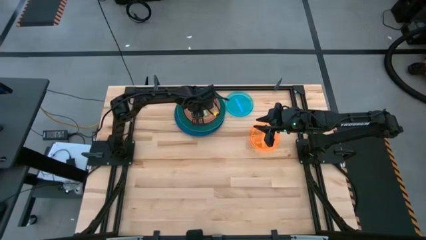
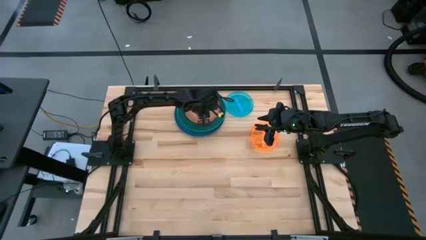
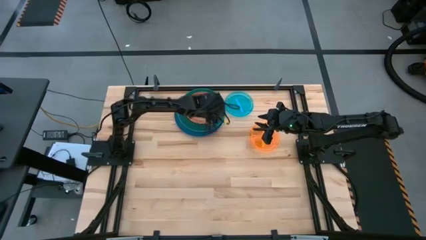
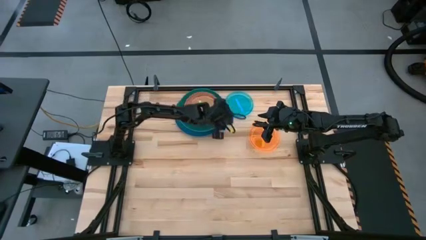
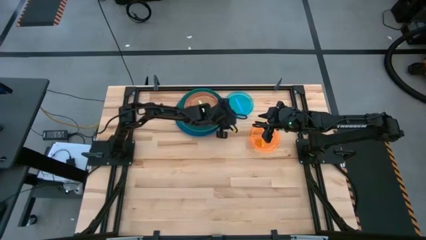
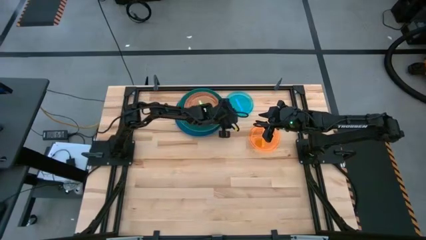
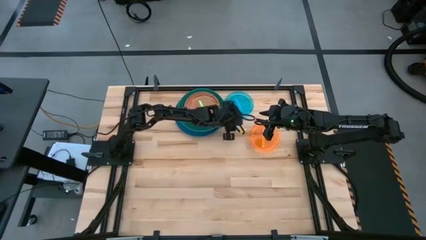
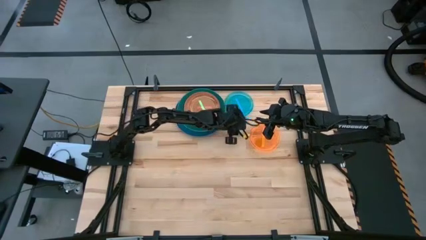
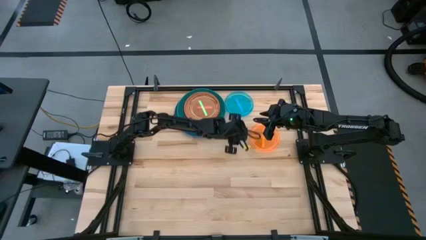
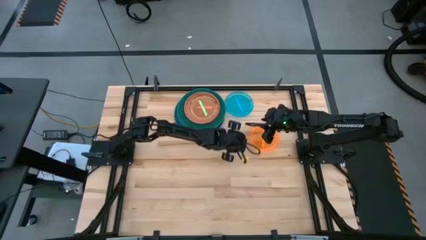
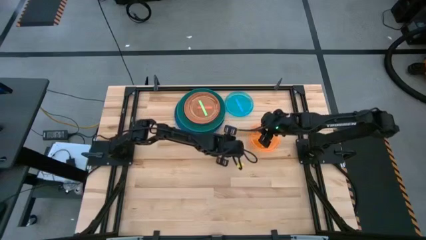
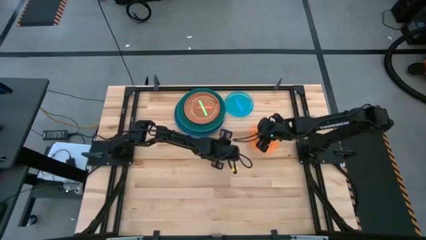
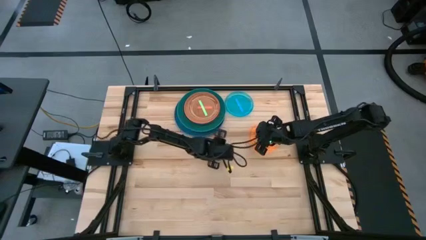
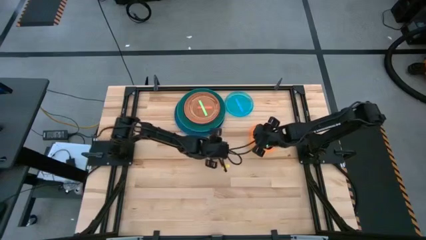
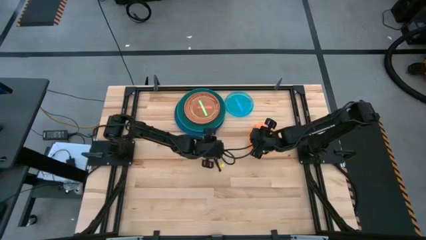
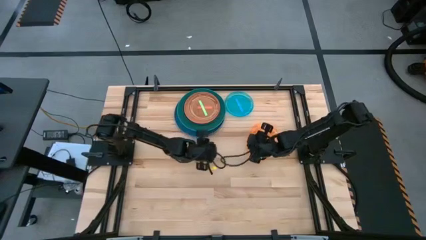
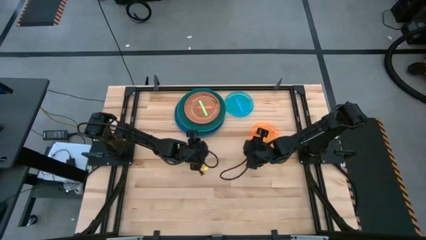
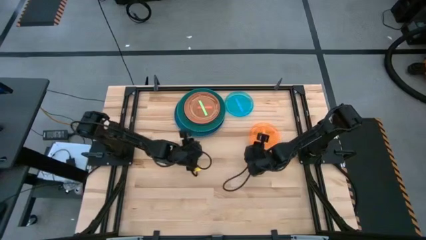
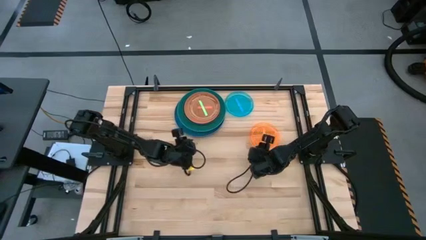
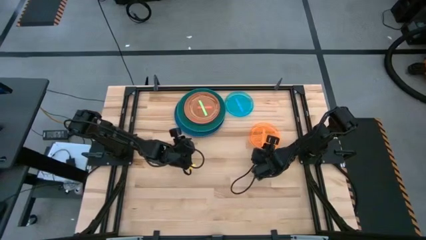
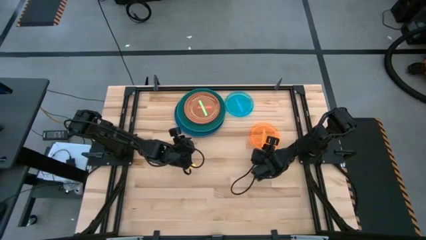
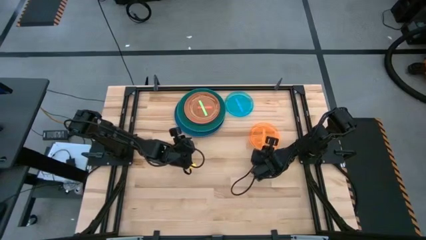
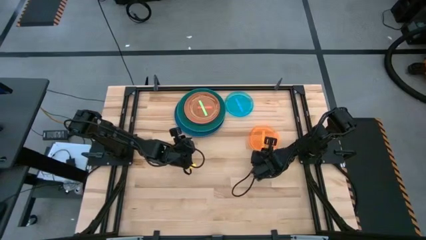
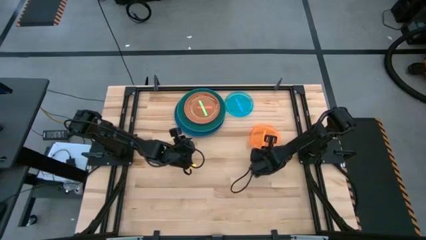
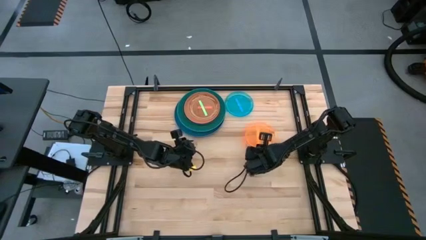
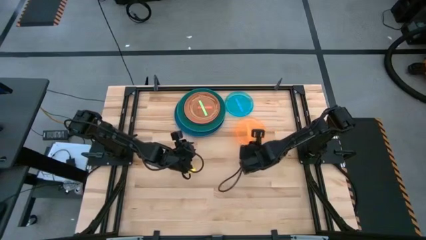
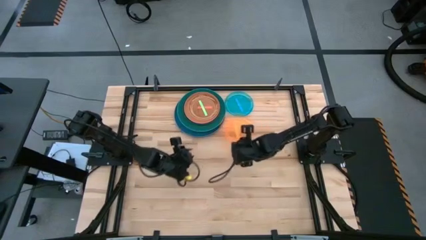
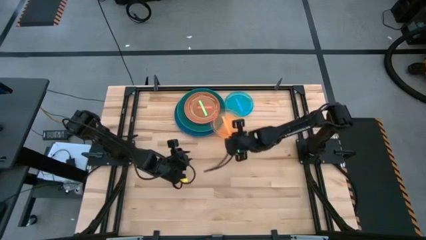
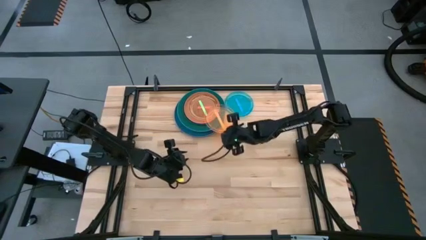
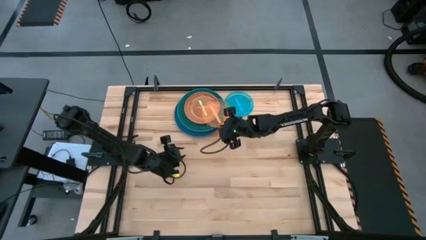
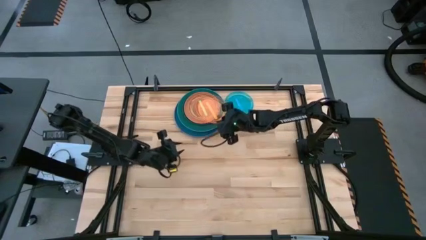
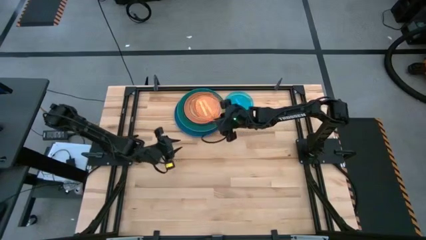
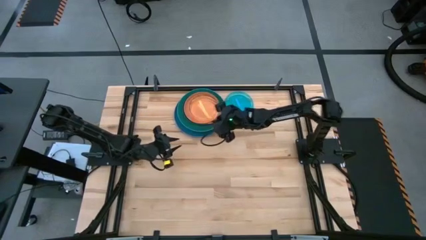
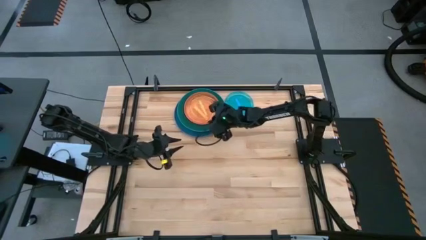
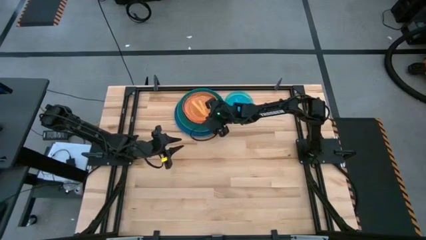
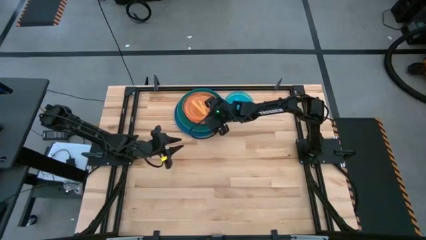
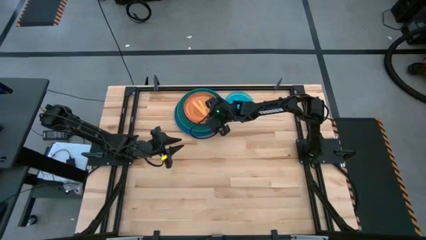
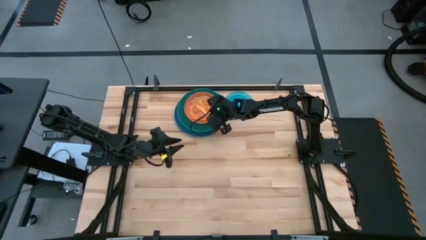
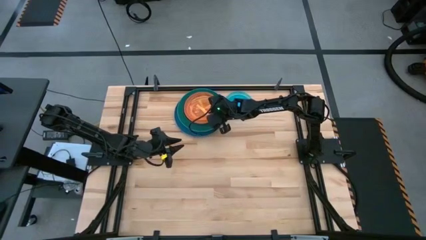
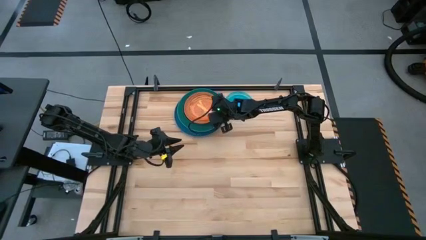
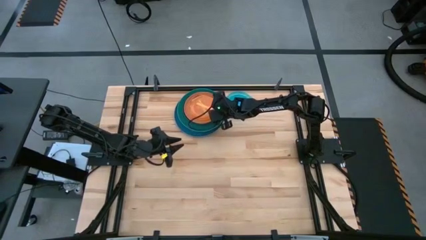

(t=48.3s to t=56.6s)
Task: Stack plastic plates
Stack the orange plate on top of the light green plate

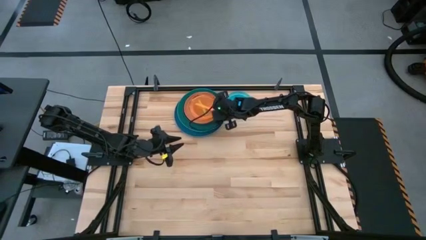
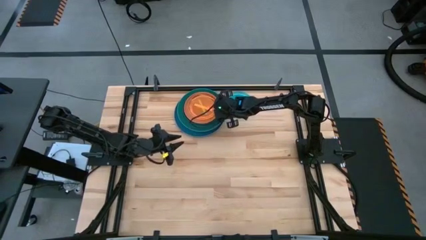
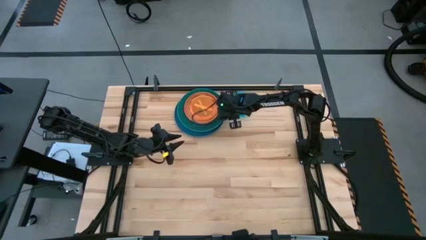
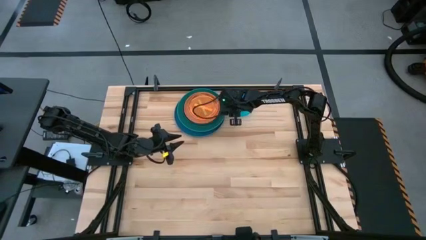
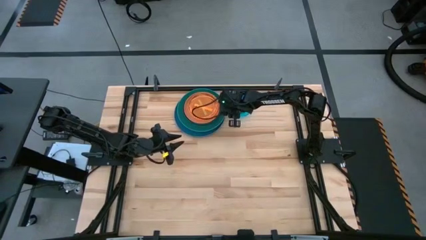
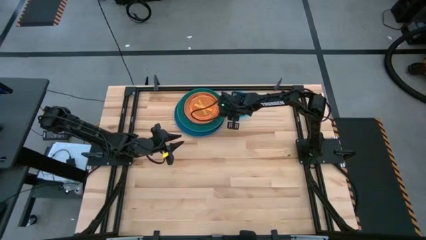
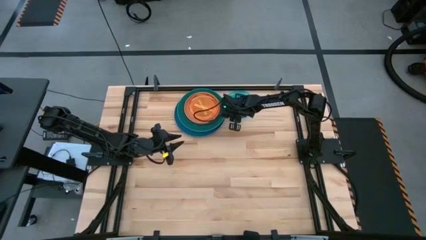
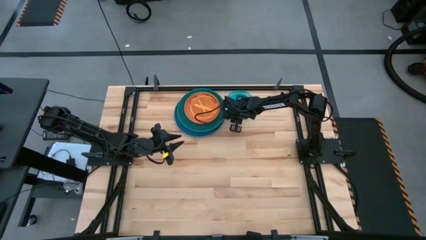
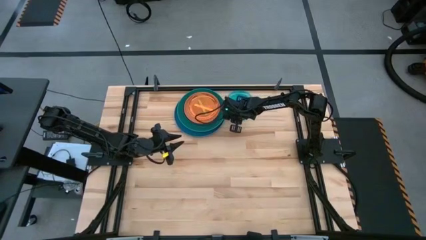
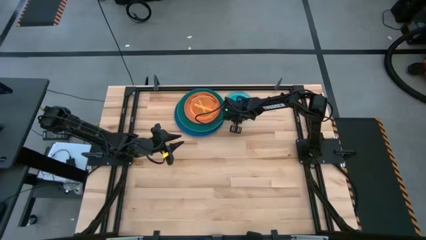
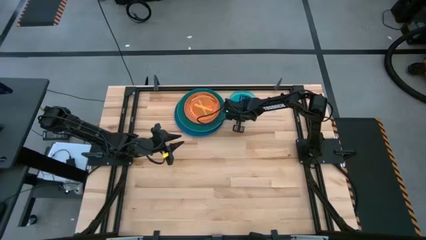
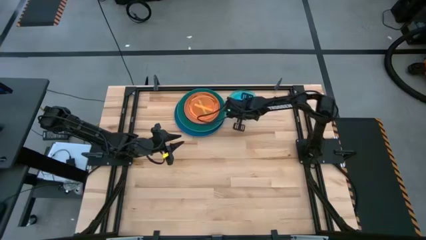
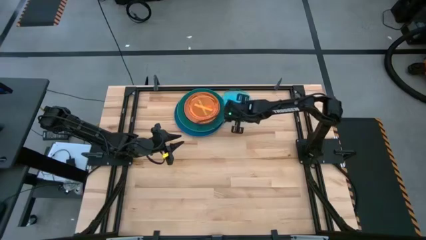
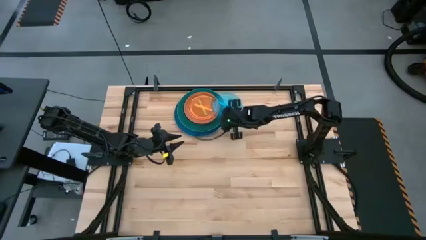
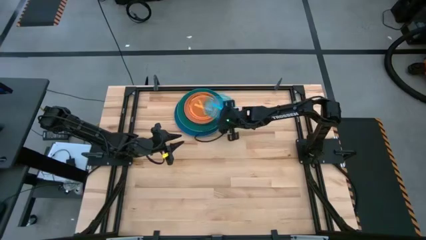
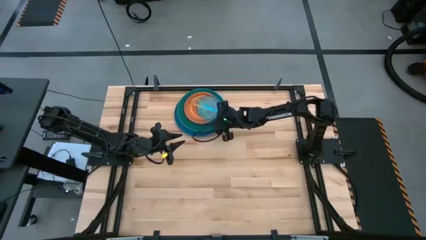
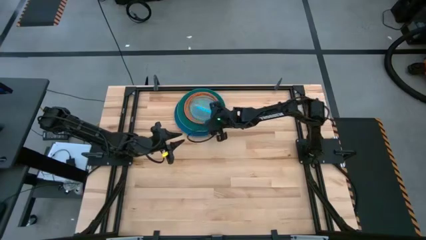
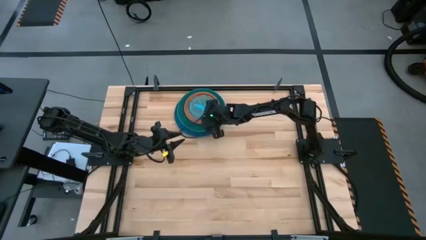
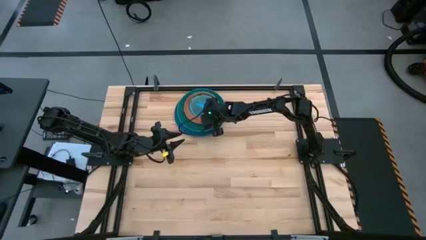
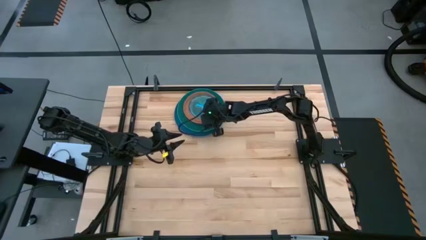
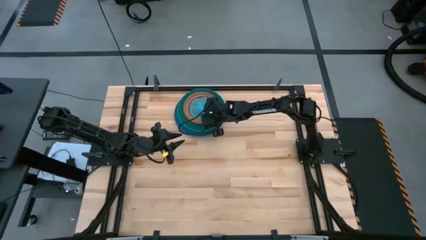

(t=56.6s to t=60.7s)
Stack the blue plate on top of the orange plate

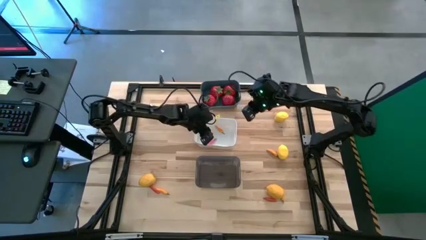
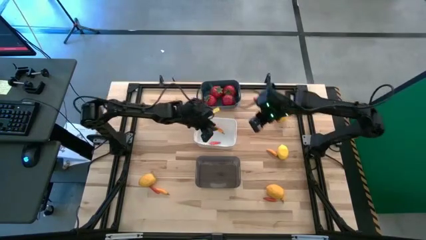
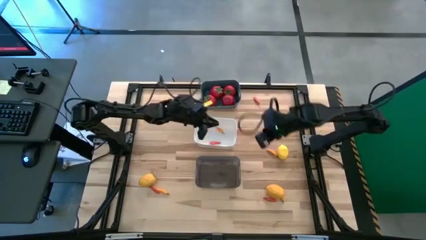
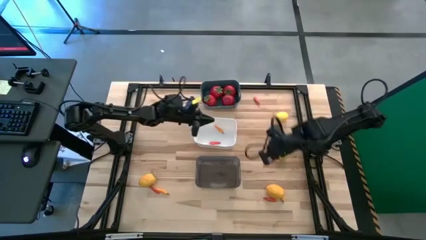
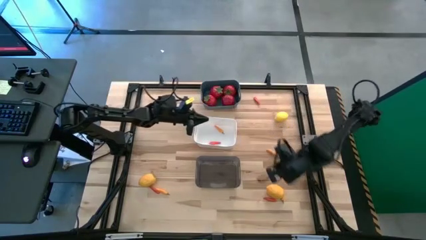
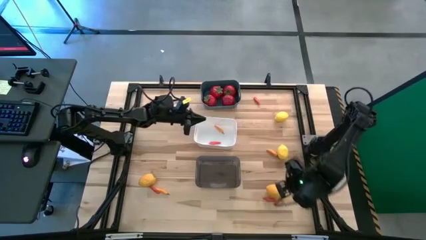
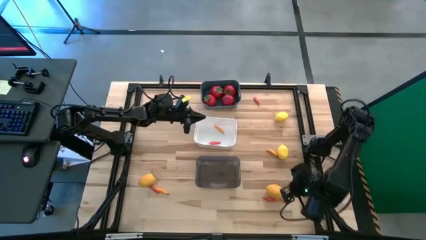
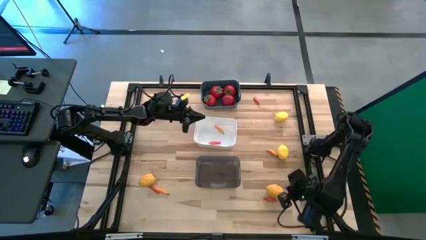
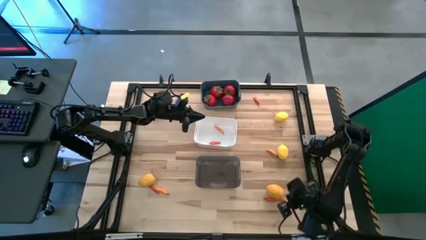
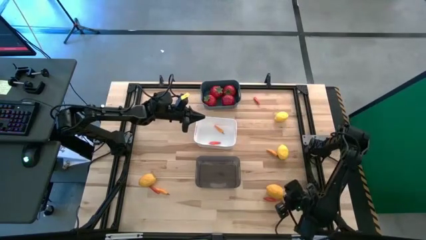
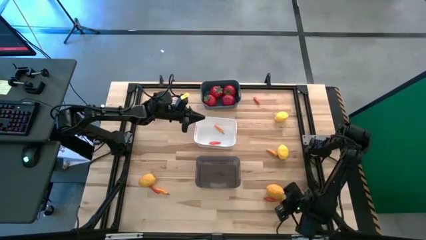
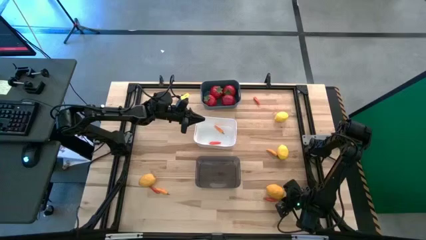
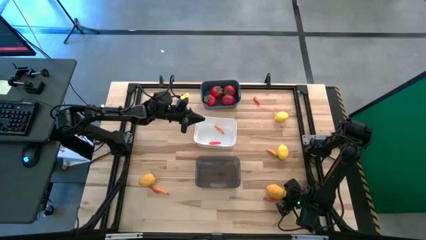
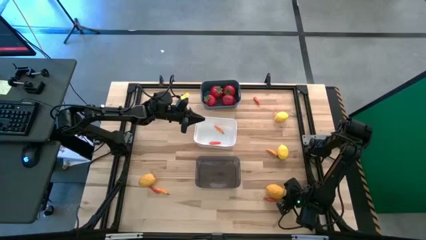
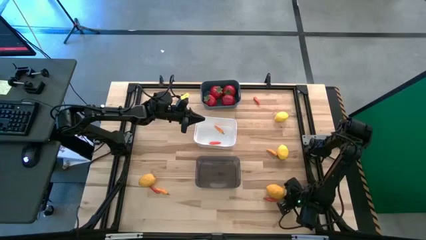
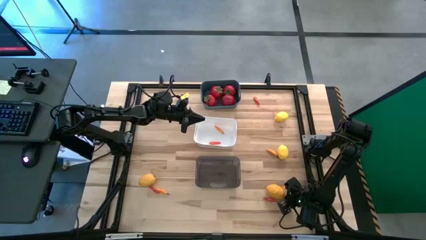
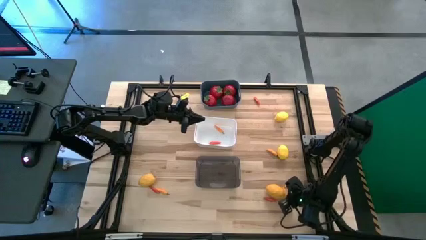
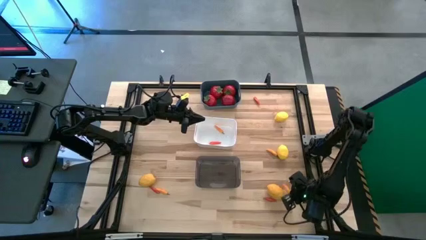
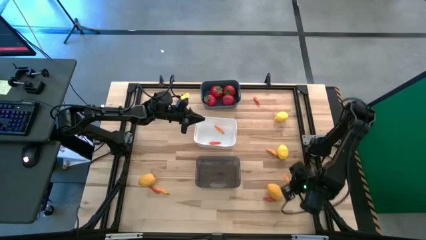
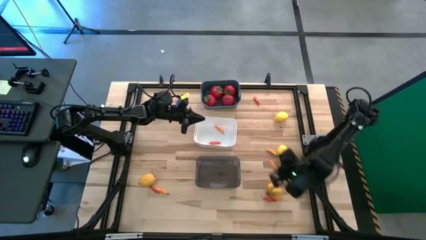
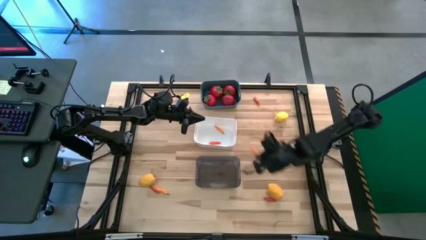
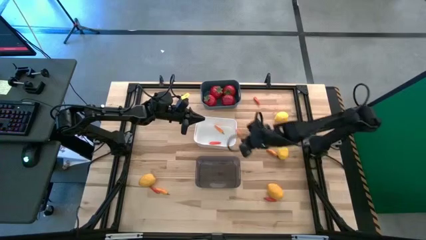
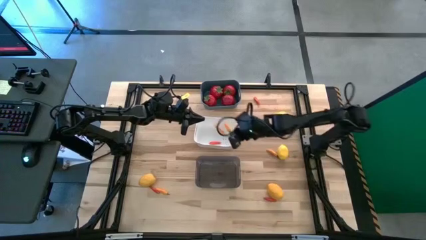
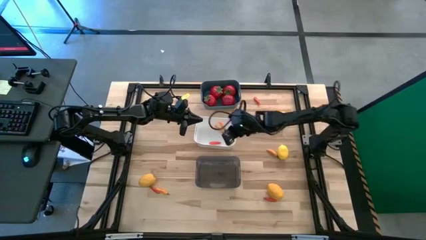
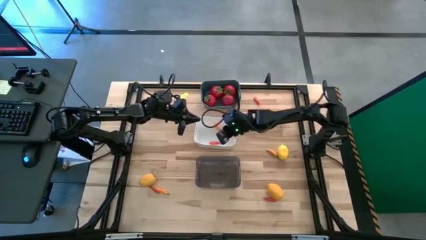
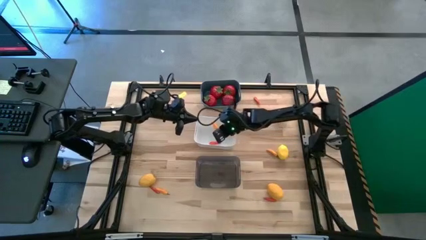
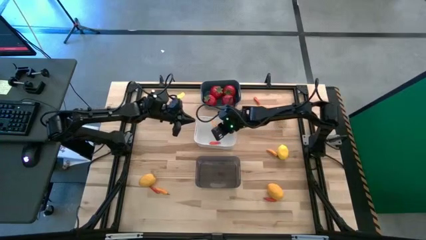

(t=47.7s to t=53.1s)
Task: Sort produce into baskets
Put the orange chili pepper into the white bin
